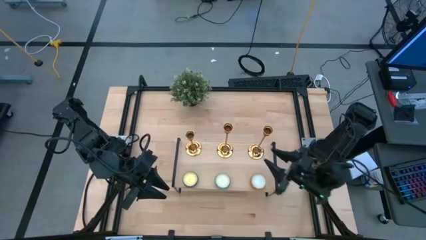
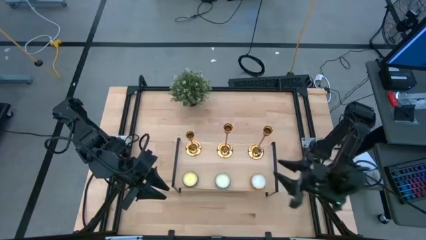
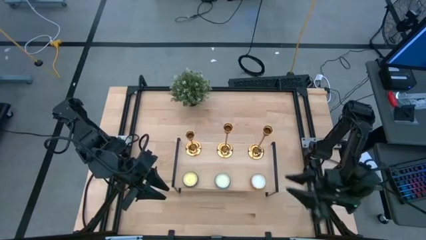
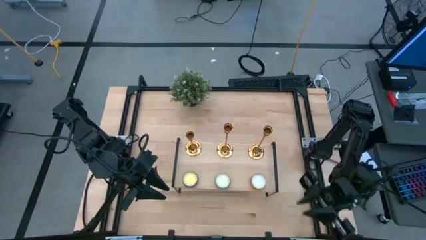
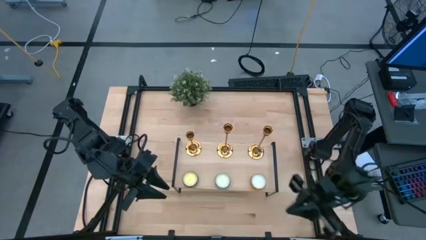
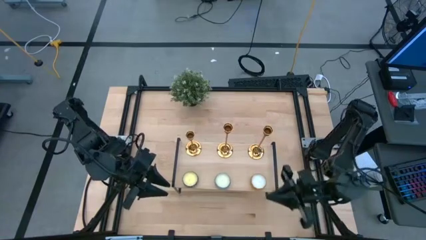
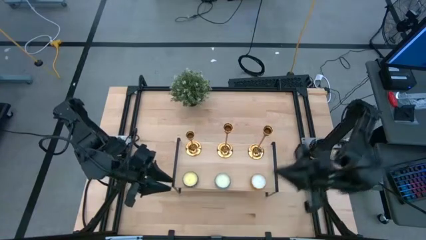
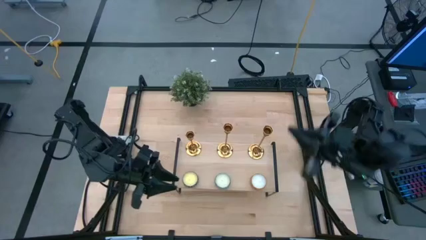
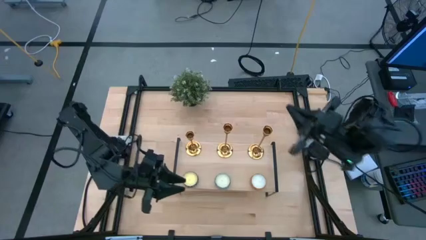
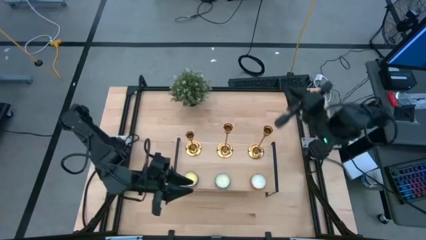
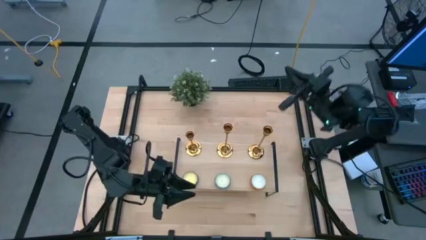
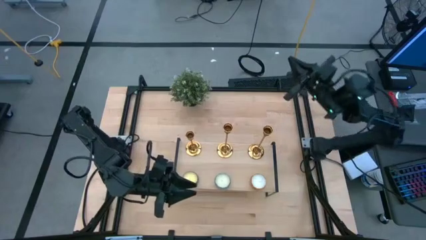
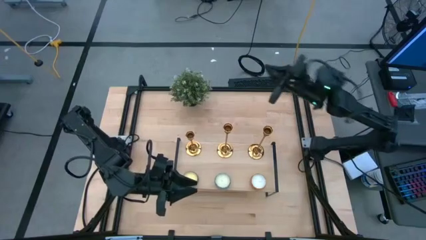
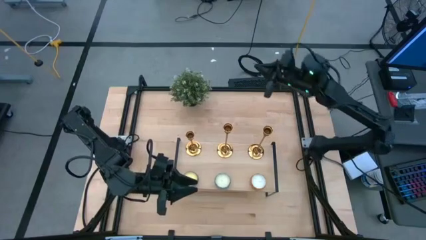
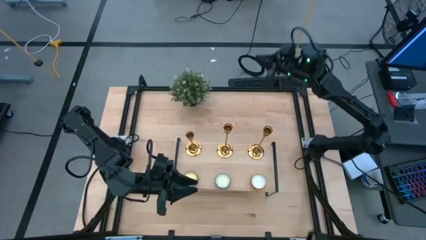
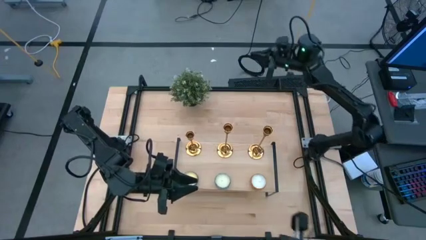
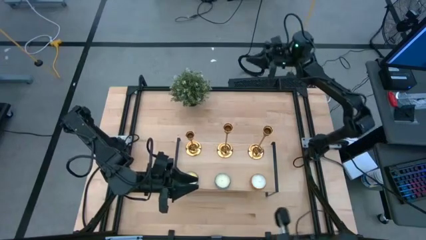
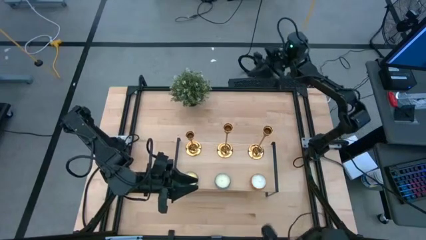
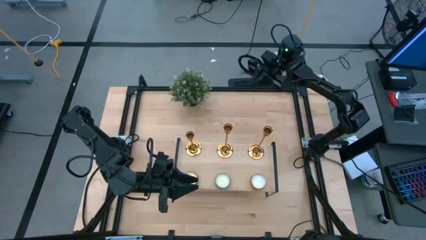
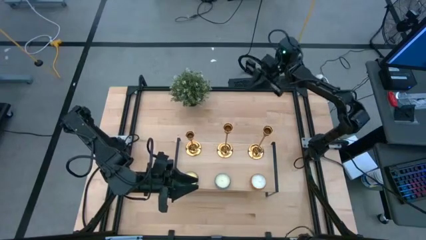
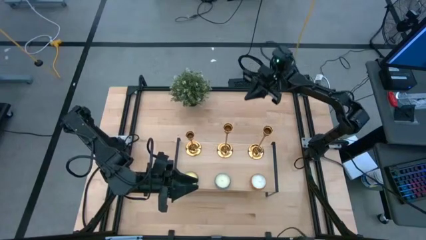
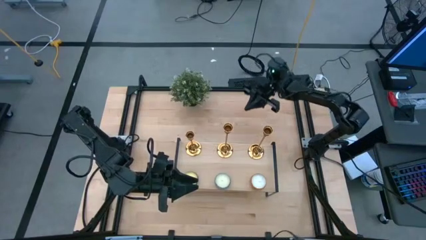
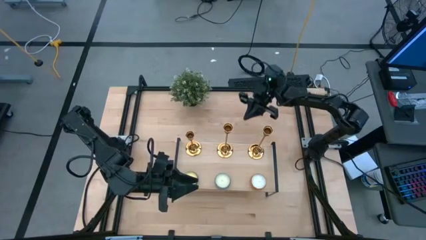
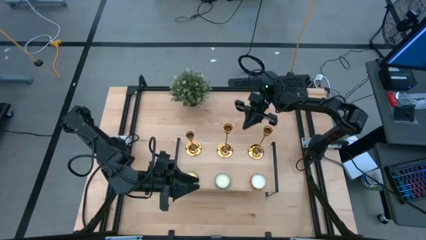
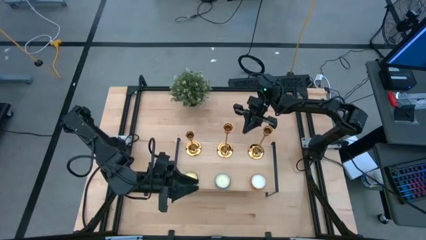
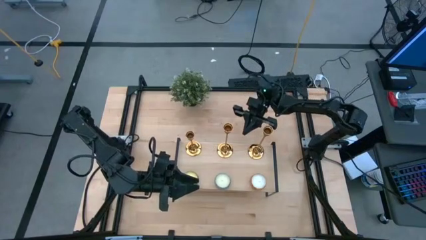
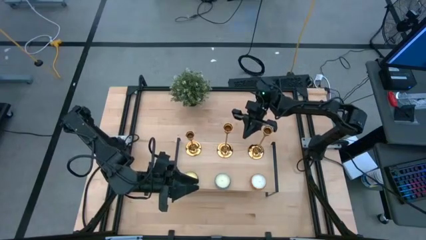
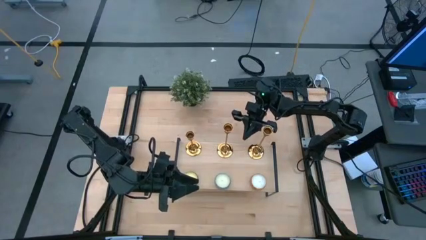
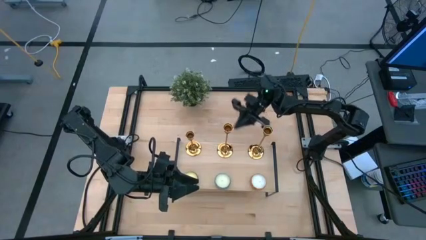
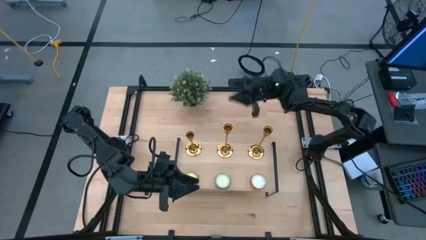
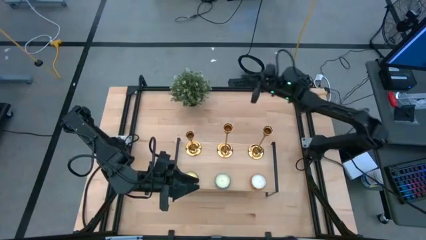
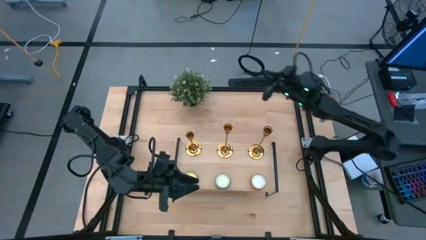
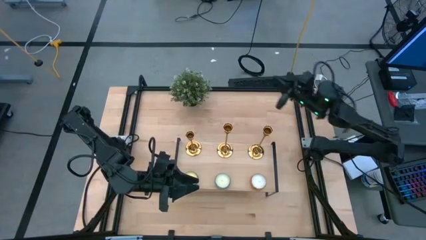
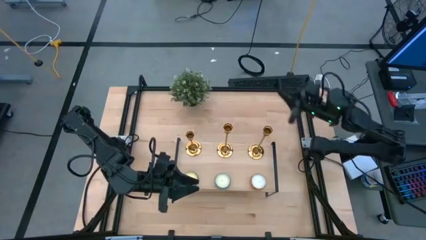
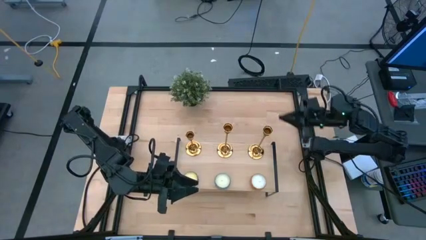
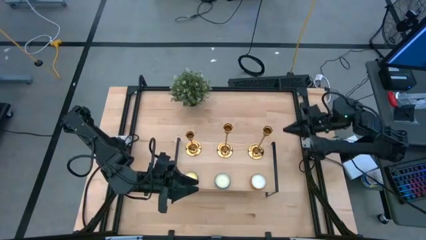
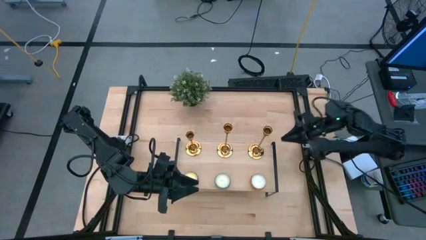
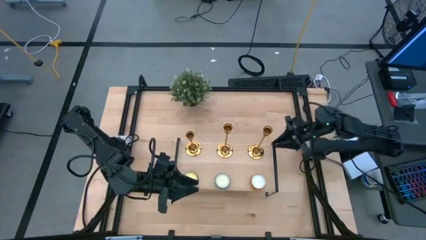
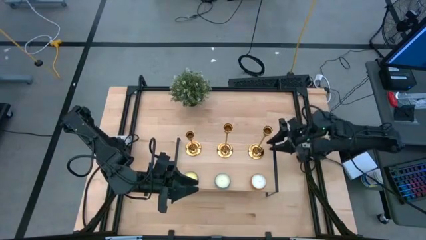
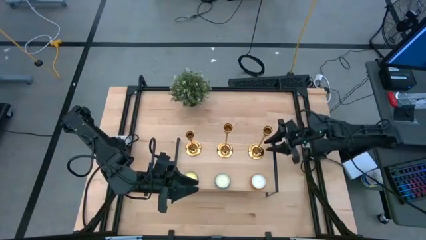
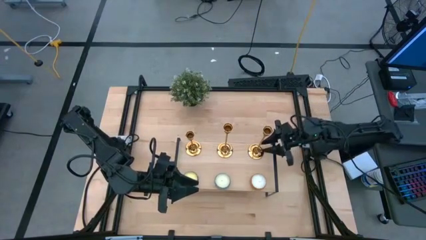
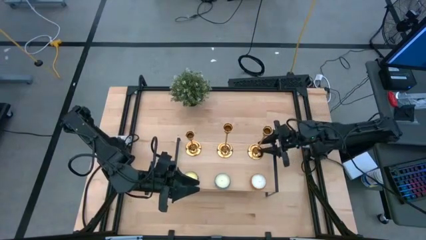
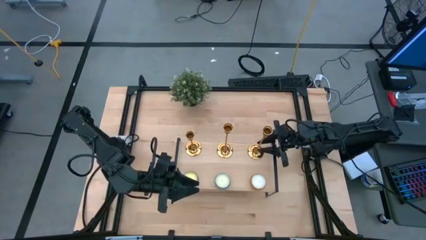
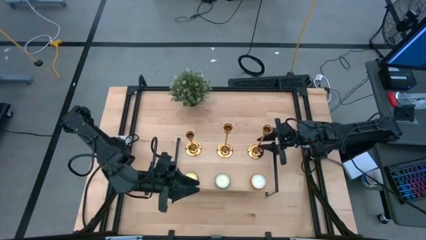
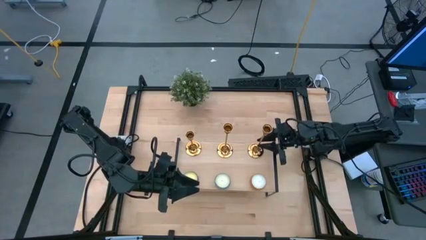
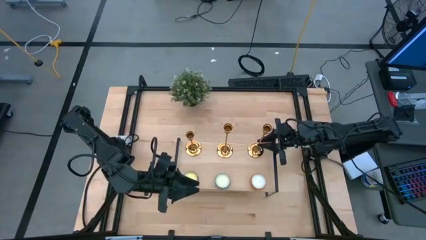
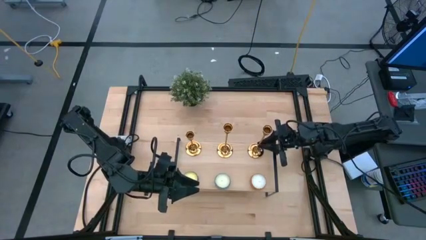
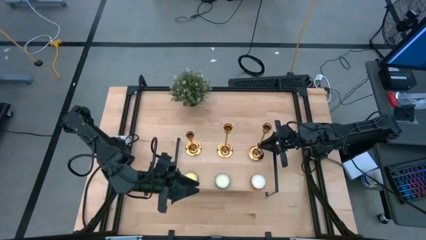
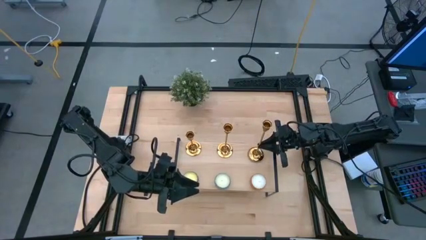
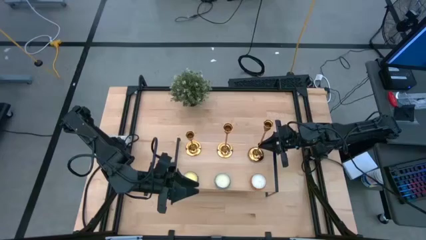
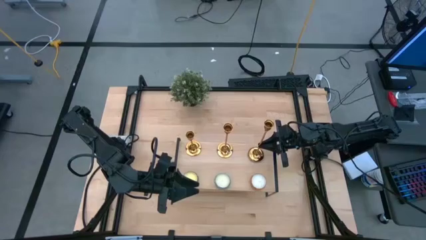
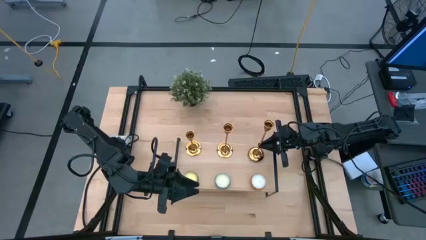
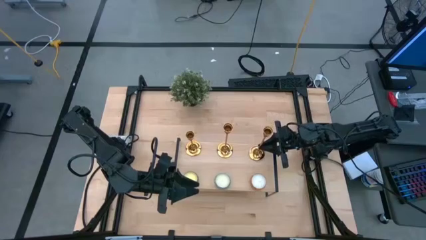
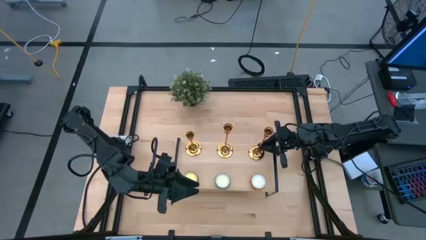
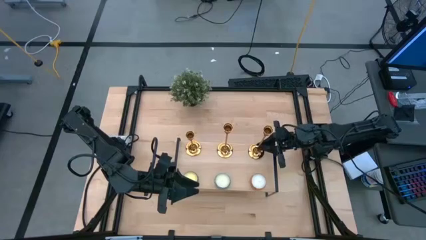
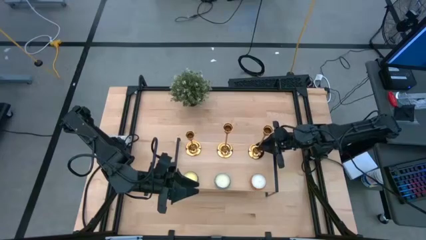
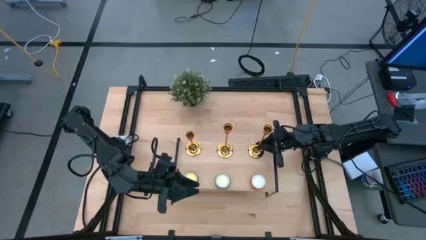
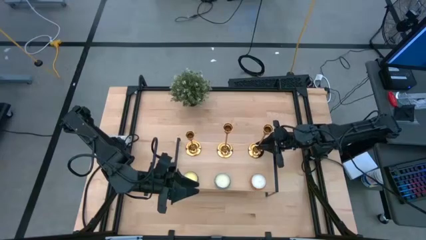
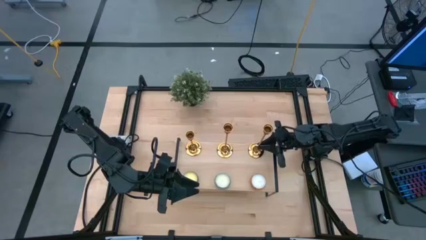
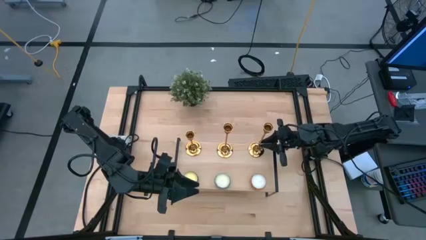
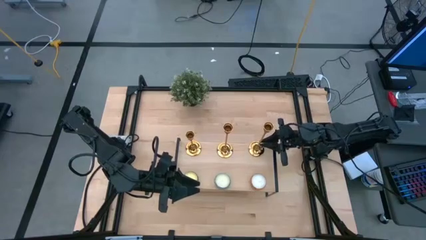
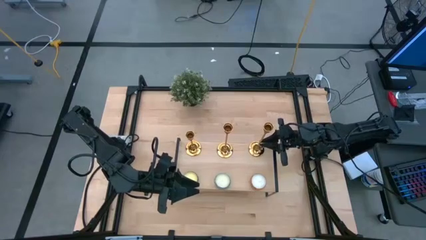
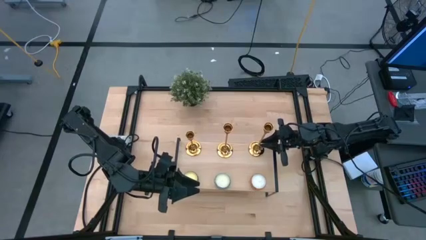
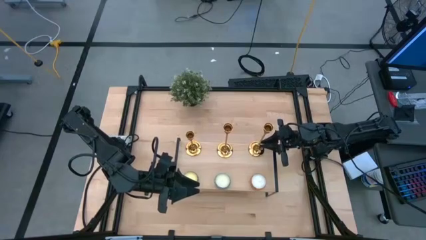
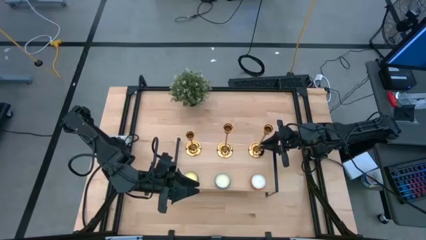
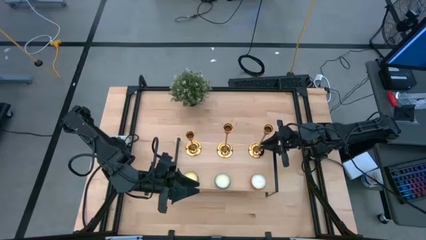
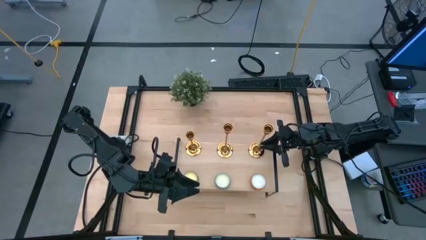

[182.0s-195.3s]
Task: Pick & Place candle stick holders
Put the candle holder on the shelf aligned with the other candle holder

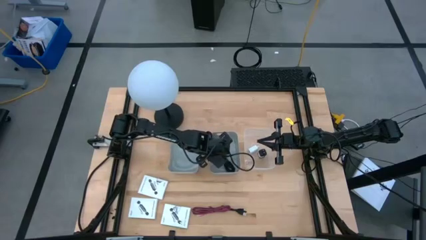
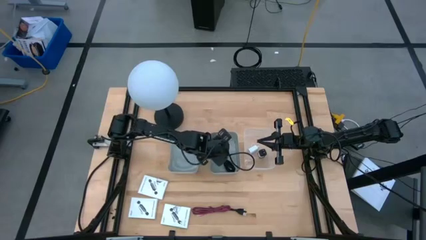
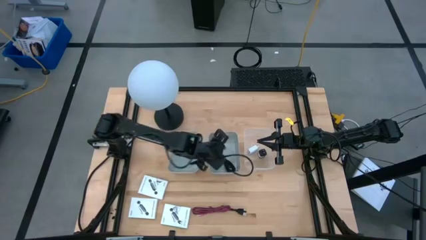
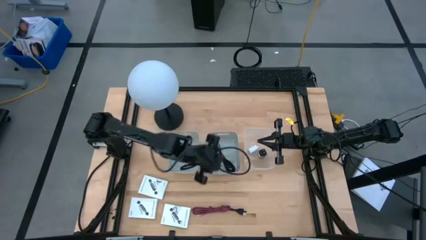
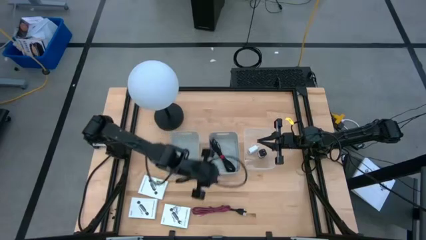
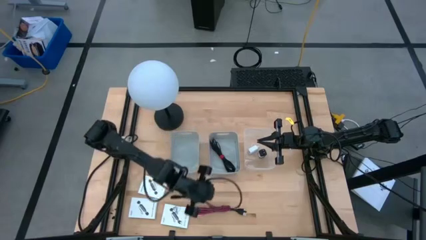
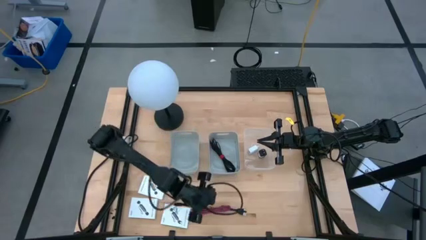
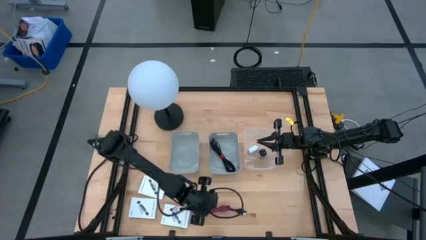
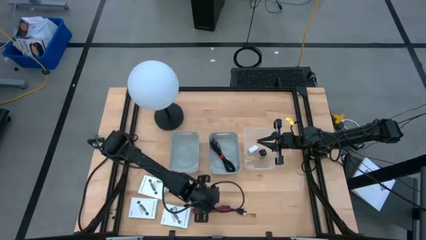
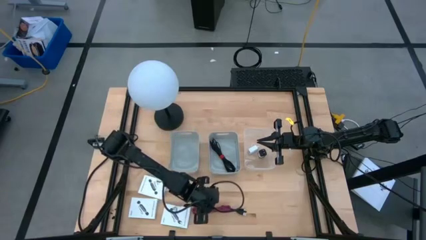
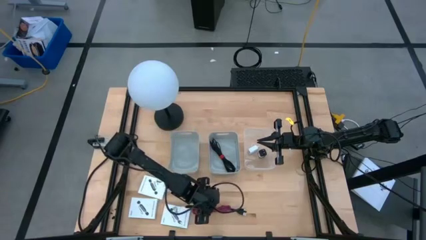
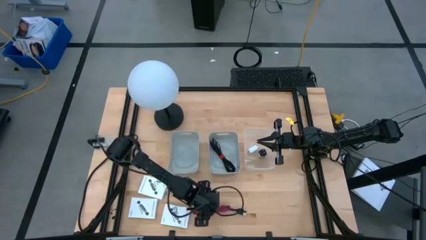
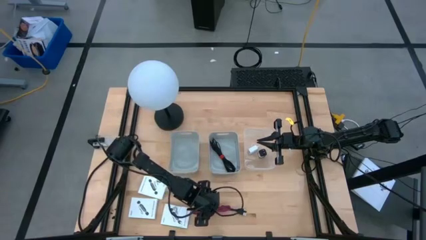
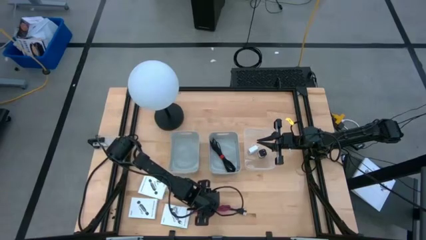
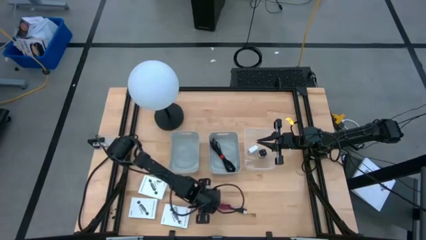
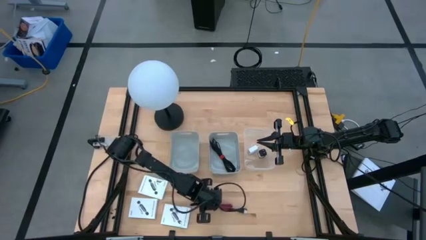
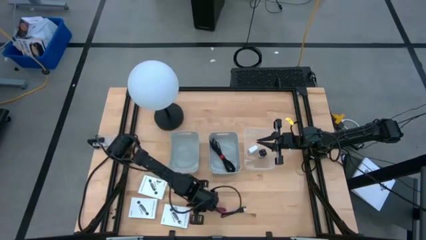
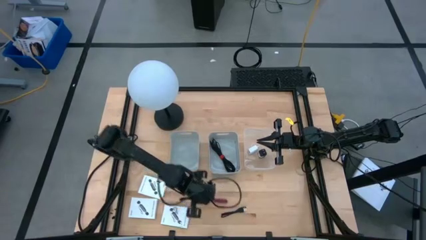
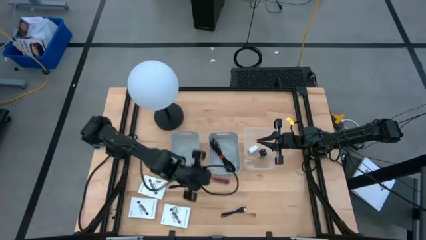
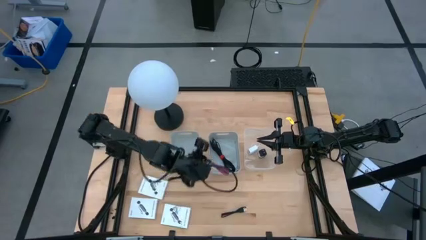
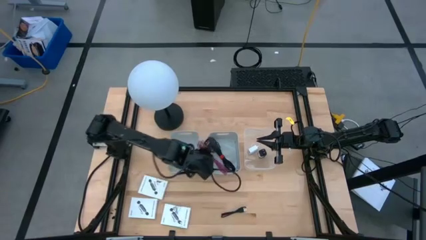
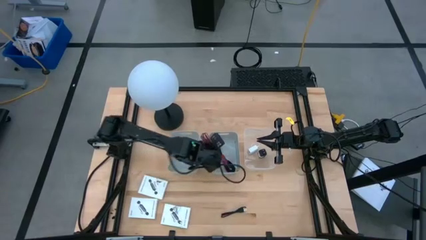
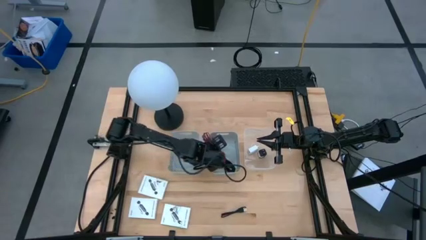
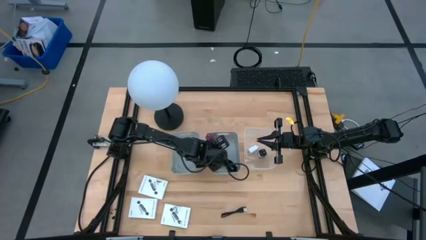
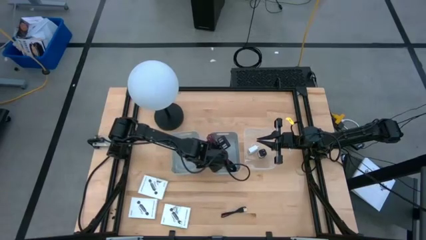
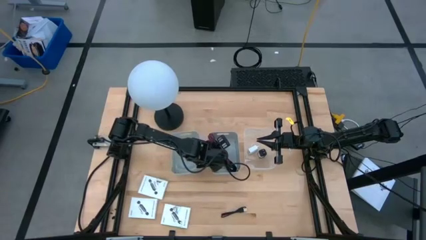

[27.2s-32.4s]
Task: Pick and place items into bin
Put the pink charger cable into the right gray bin
